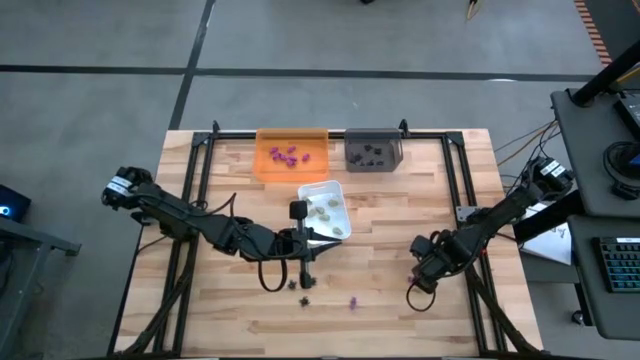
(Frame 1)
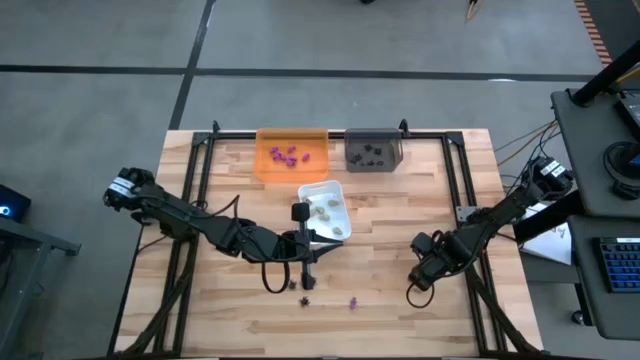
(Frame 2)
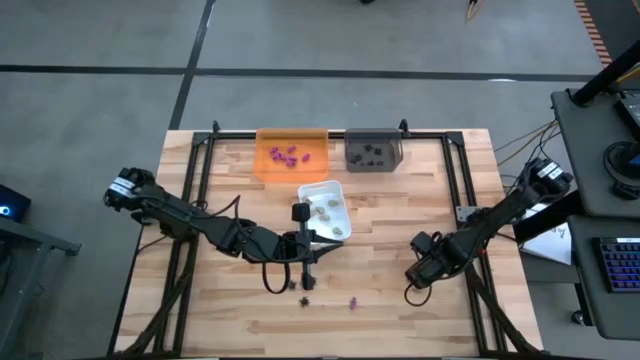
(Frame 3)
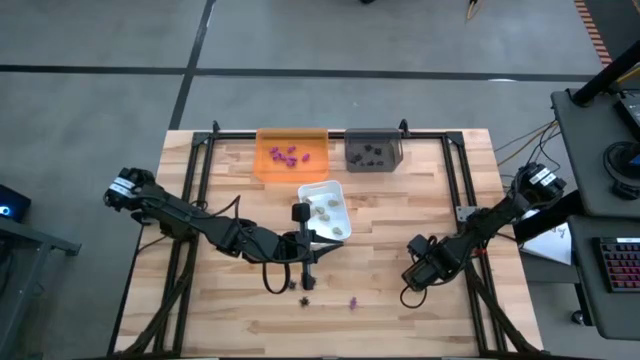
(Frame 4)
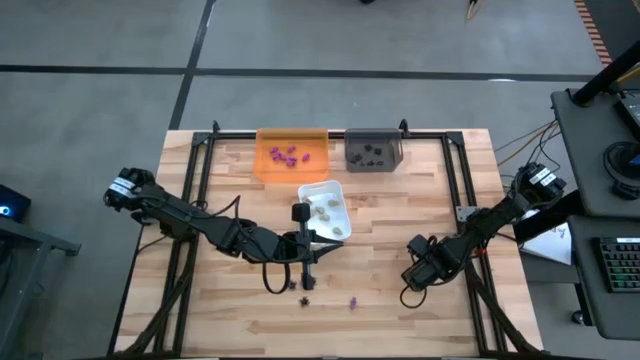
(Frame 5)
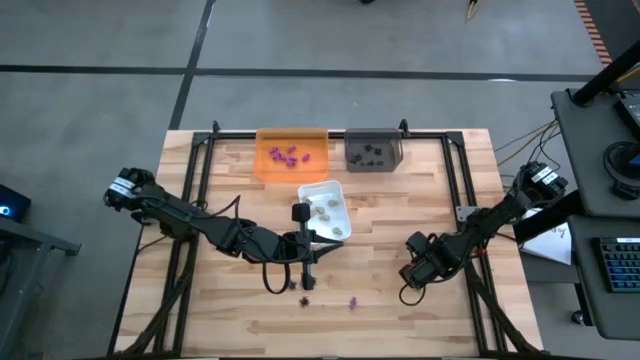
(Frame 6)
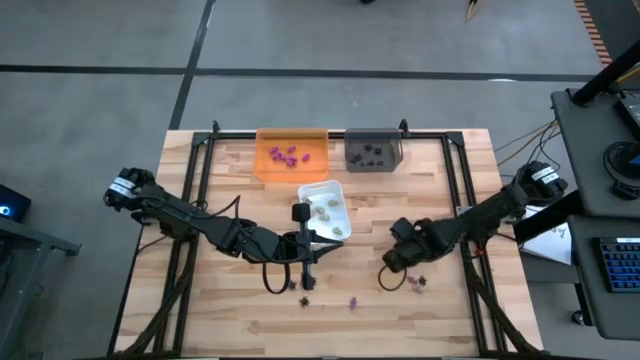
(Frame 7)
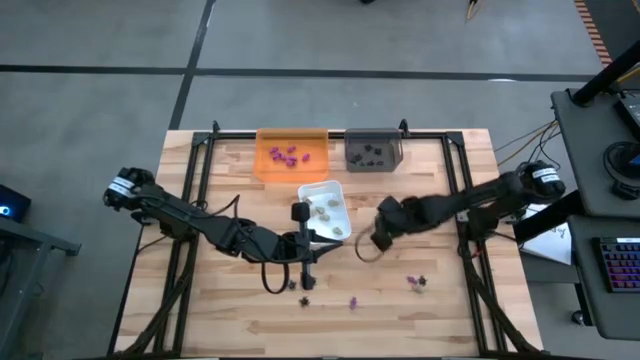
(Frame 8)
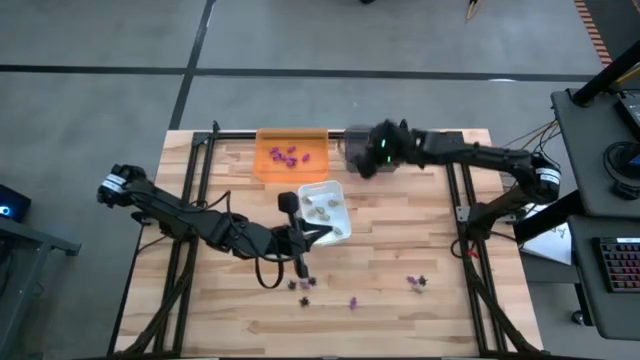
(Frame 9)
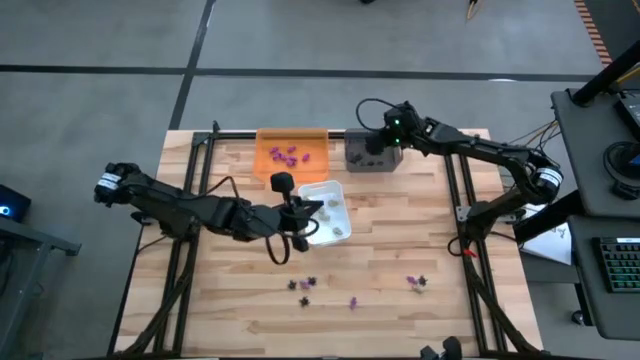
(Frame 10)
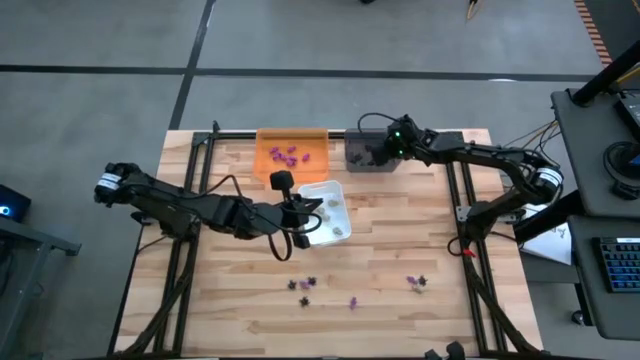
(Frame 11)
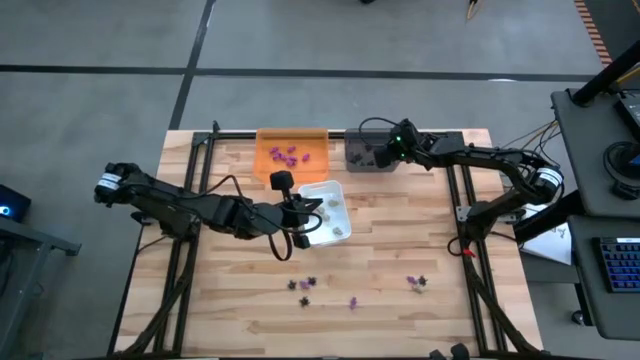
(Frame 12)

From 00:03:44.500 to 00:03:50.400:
Task: Sort Halloween decoration
Put the black spider toy into the black bin

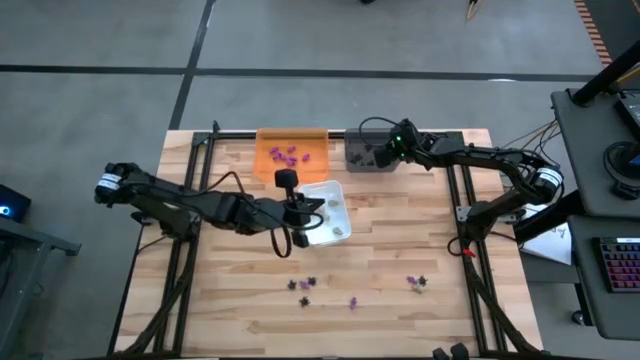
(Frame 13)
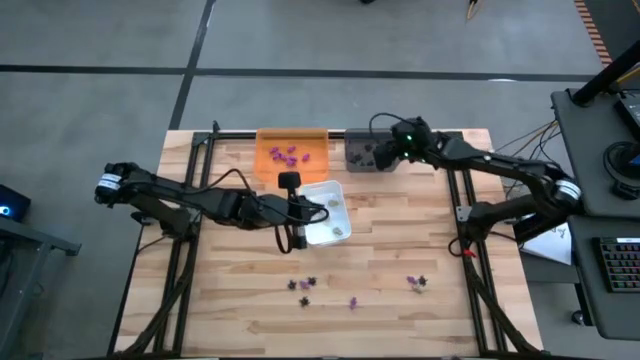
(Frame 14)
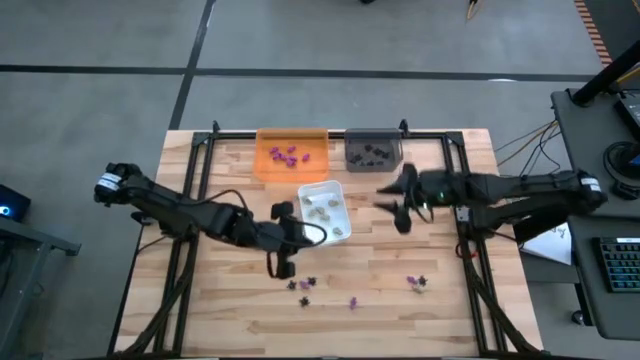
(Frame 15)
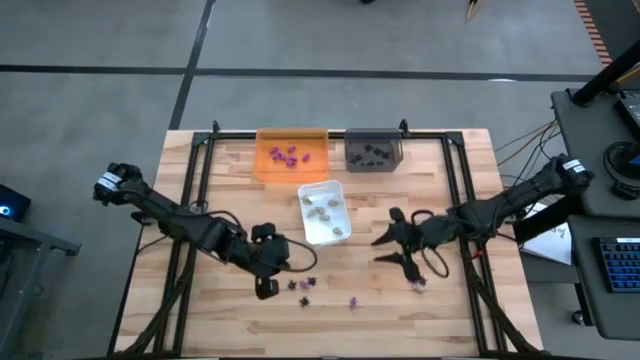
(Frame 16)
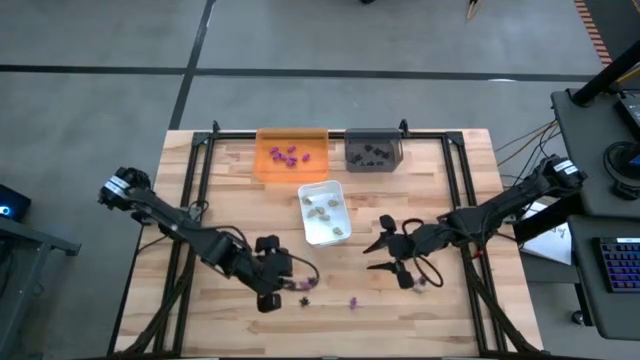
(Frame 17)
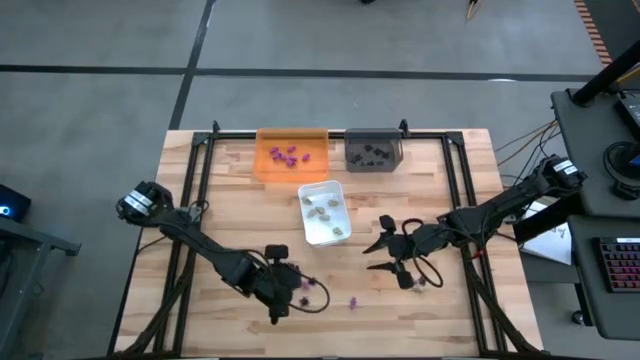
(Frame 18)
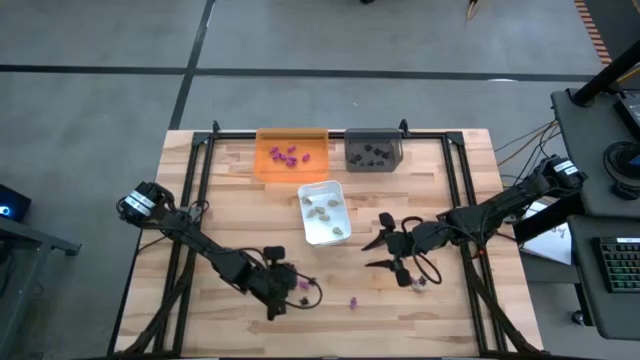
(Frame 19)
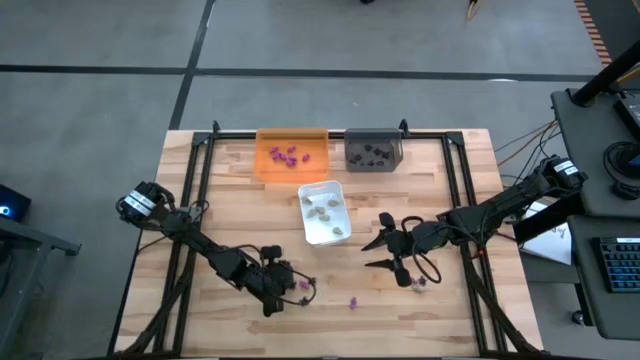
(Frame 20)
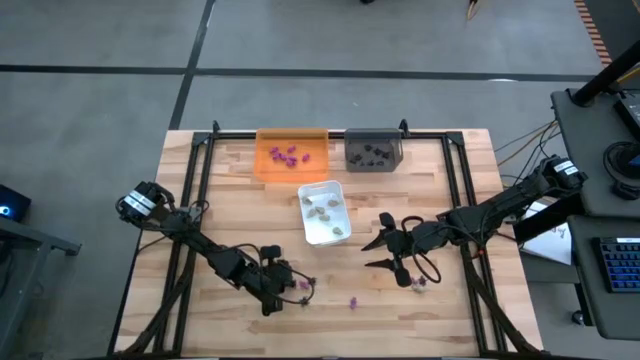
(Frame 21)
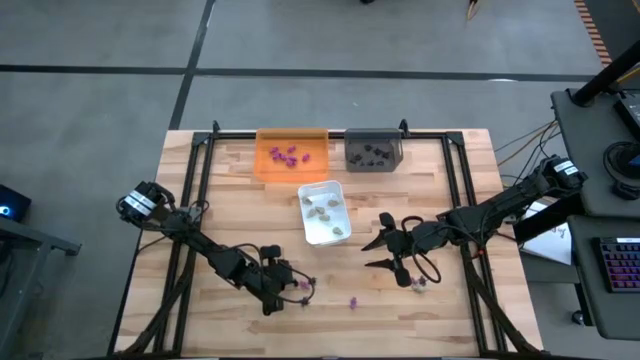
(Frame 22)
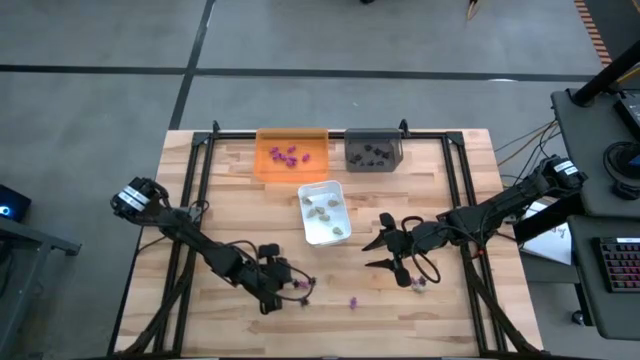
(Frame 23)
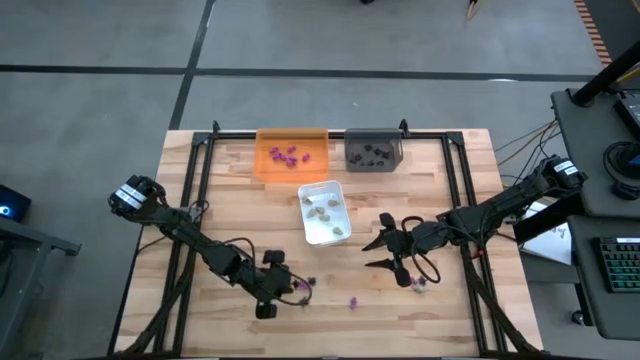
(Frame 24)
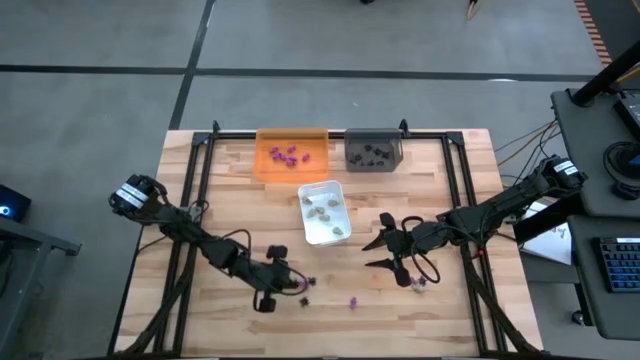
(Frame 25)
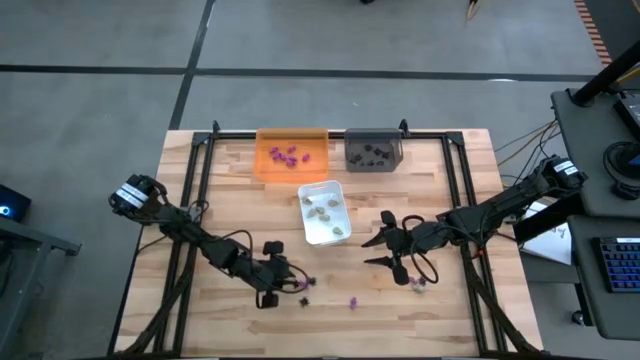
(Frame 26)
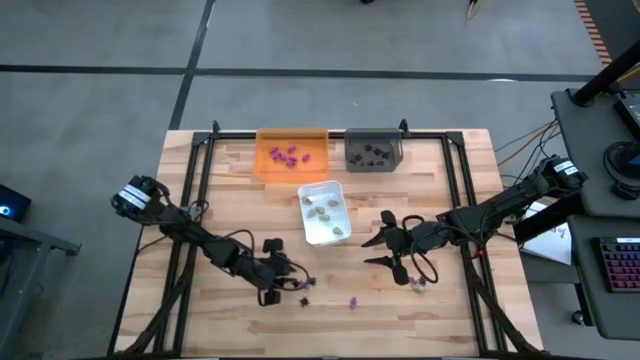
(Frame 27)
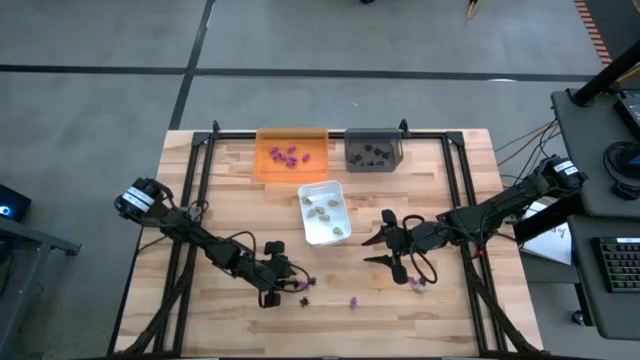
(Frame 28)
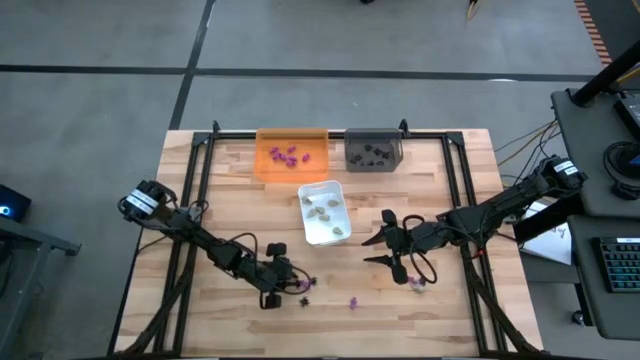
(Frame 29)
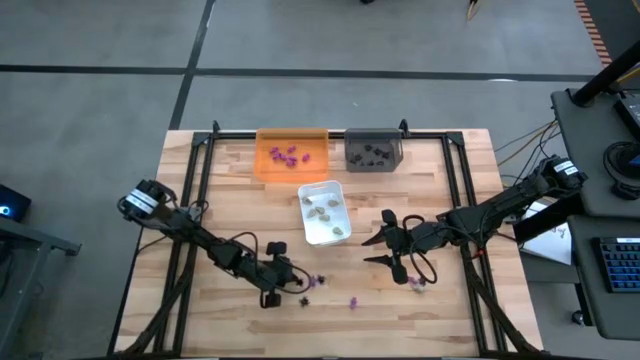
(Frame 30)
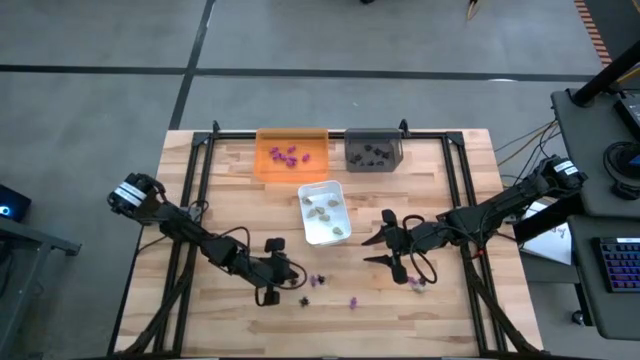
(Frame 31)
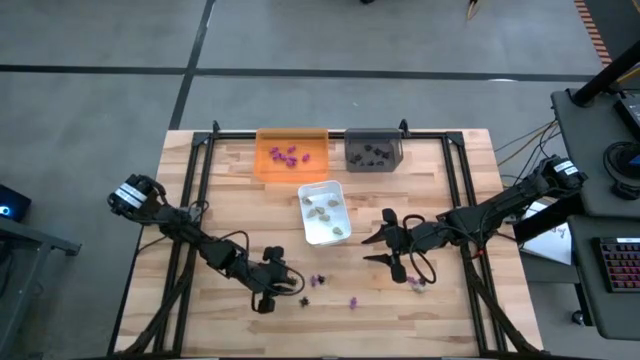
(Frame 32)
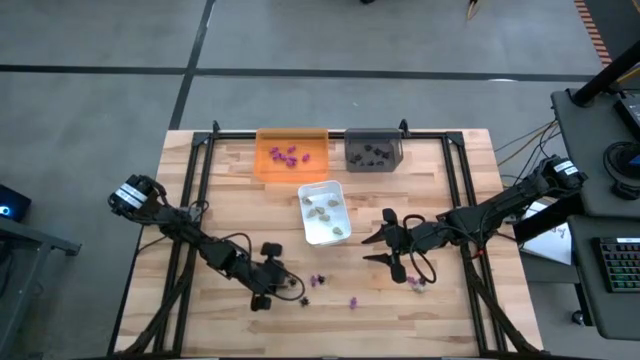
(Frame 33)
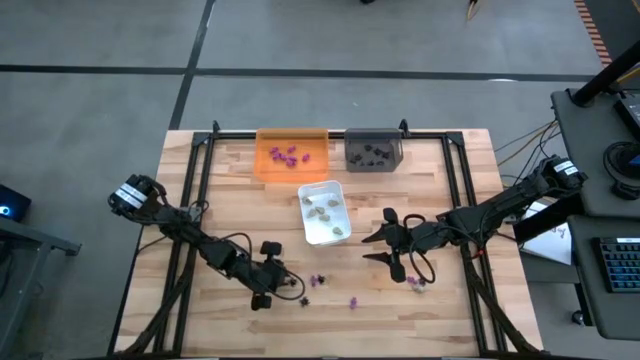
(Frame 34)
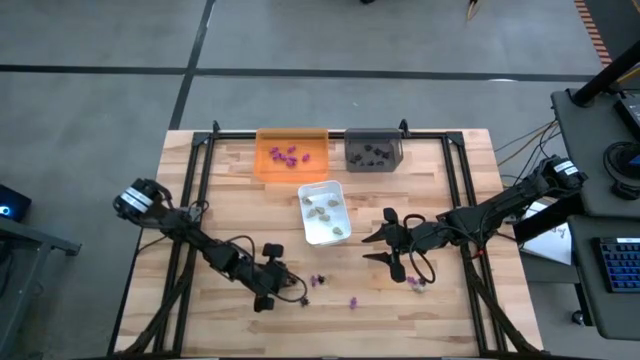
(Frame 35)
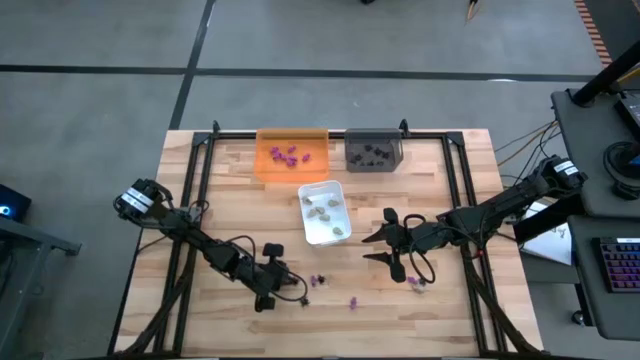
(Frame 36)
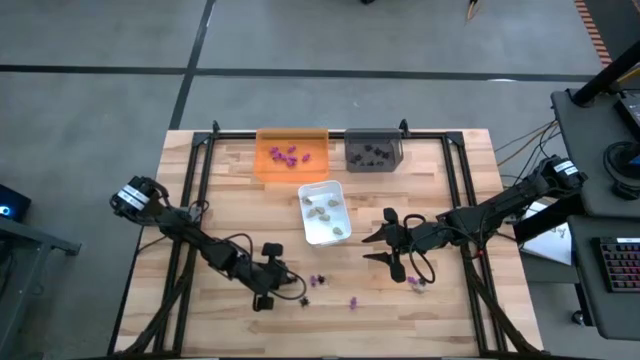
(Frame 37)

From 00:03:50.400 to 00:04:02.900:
Put the black spider toy into the black bin

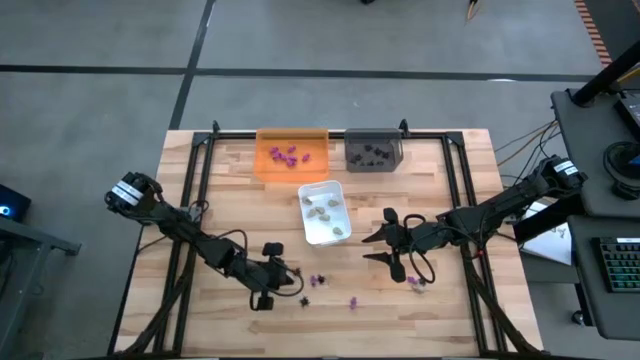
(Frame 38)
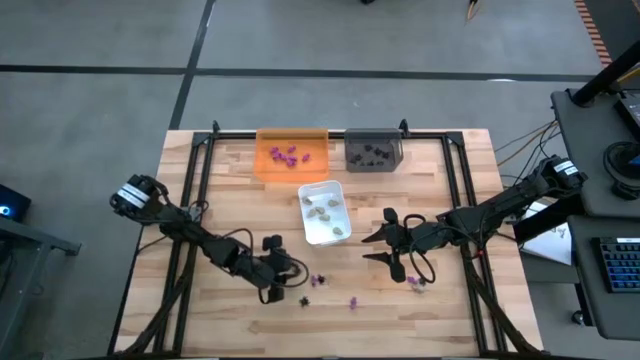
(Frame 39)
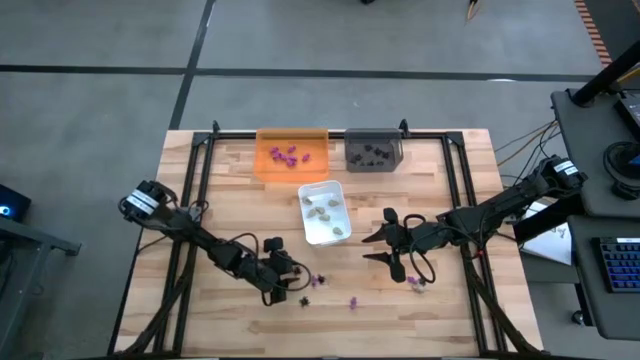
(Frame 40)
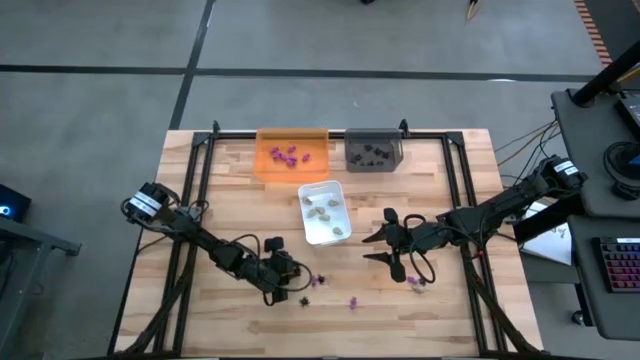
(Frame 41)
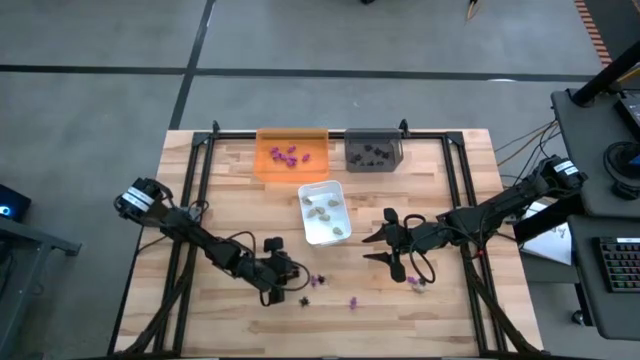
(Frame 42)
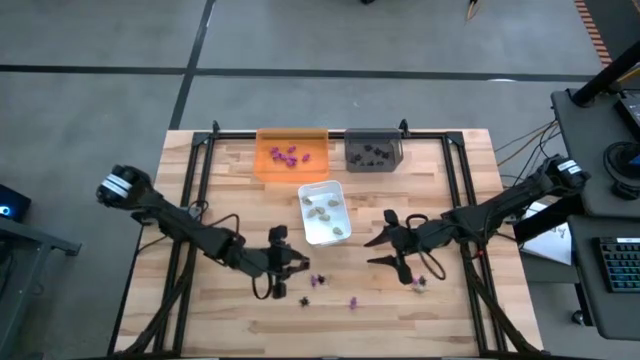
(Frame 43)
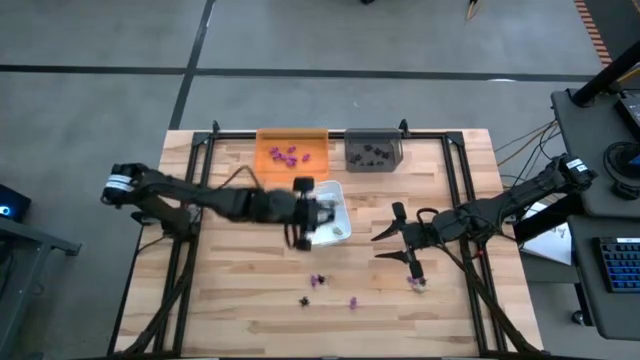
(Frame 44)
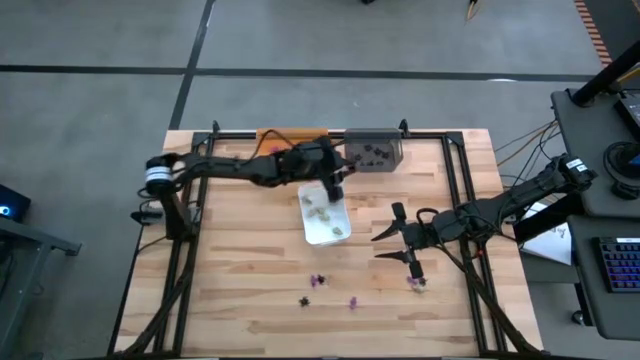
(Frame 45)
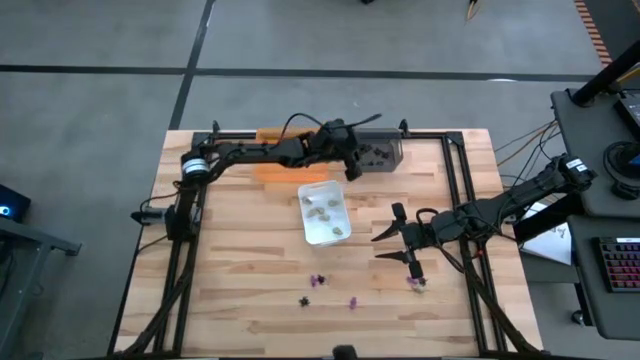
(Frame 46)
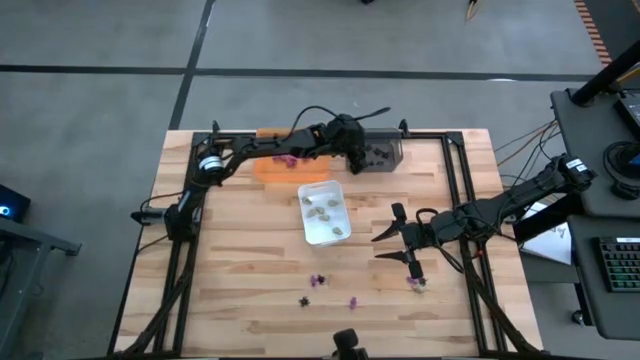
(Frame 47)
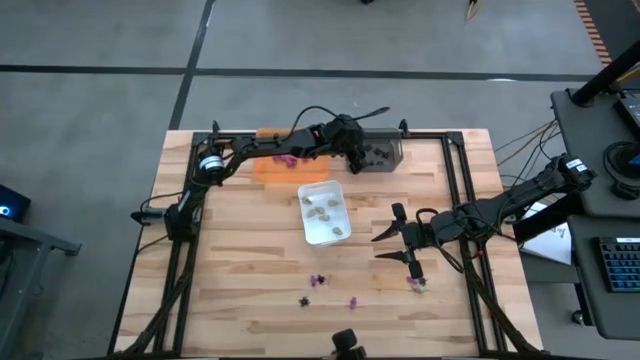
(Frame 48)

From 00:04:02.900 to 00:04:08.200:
Put the black spider toy into the black bin
